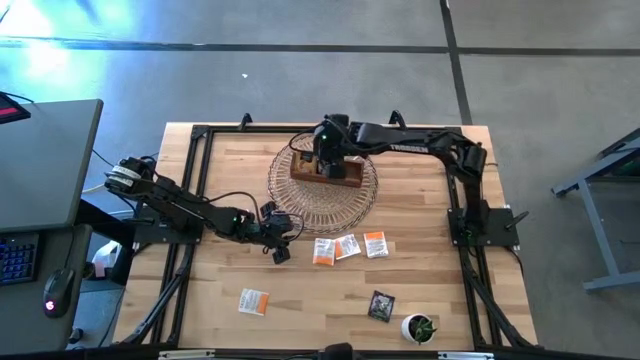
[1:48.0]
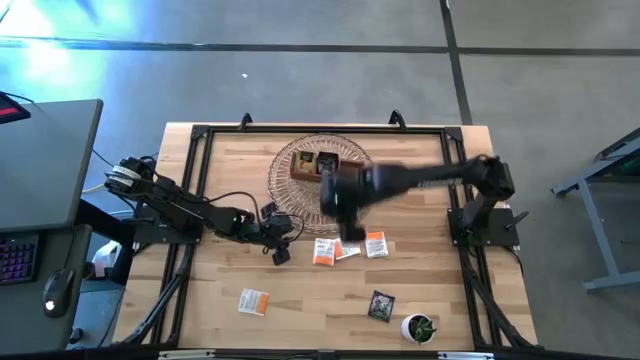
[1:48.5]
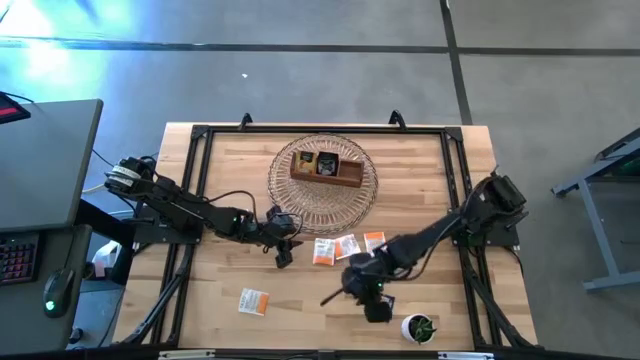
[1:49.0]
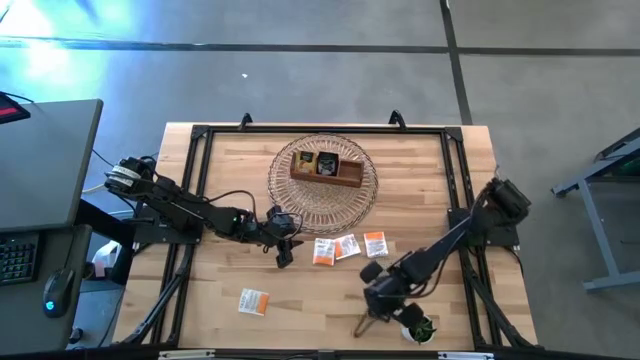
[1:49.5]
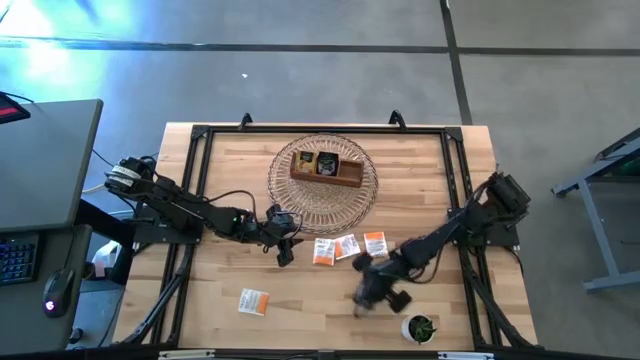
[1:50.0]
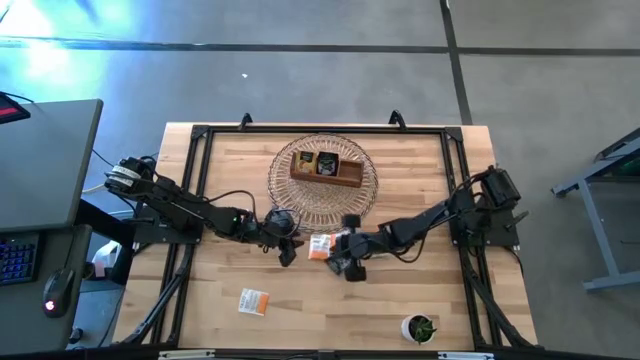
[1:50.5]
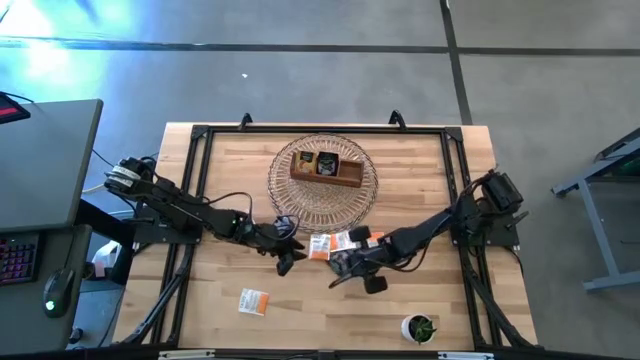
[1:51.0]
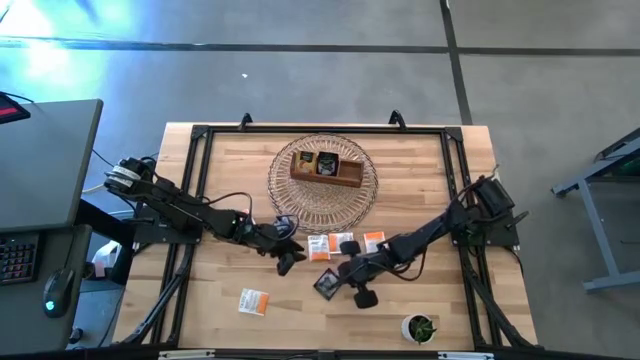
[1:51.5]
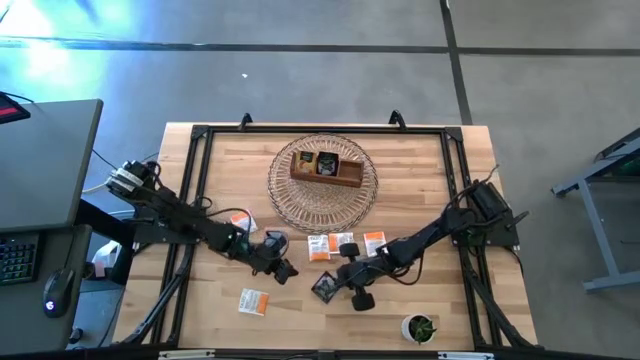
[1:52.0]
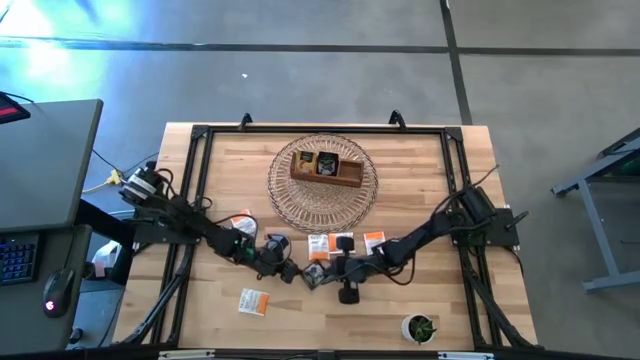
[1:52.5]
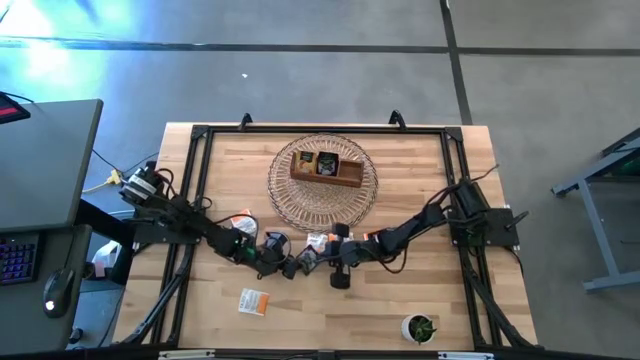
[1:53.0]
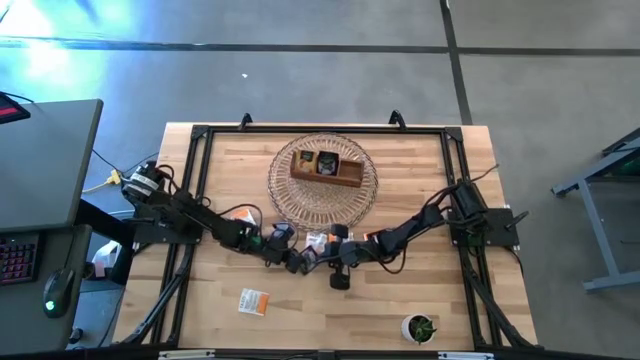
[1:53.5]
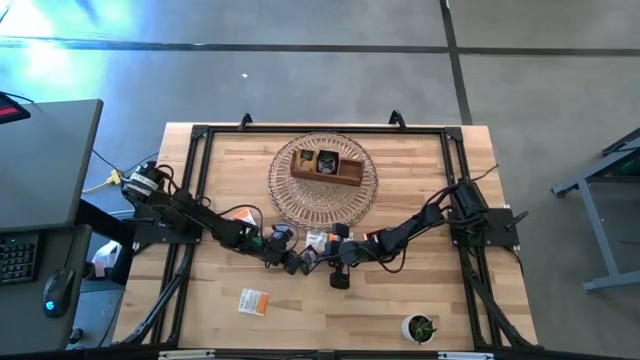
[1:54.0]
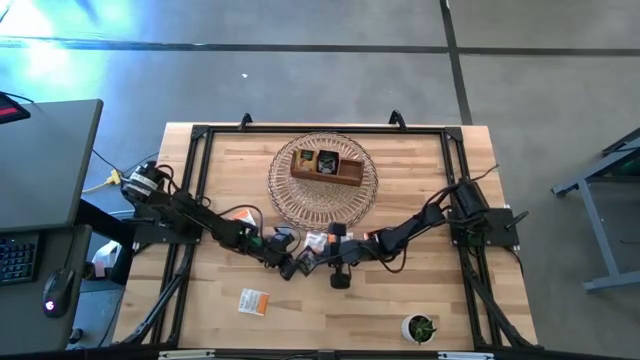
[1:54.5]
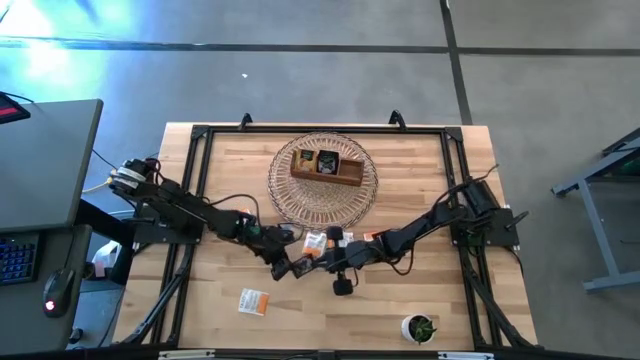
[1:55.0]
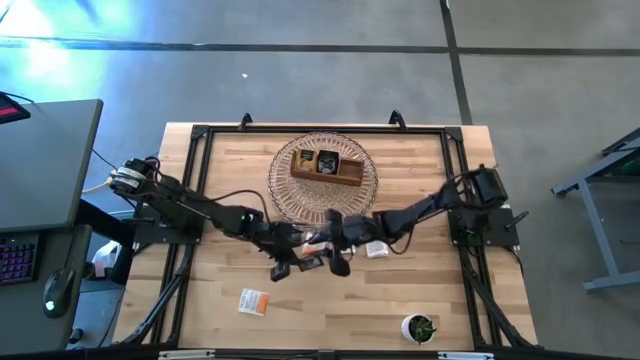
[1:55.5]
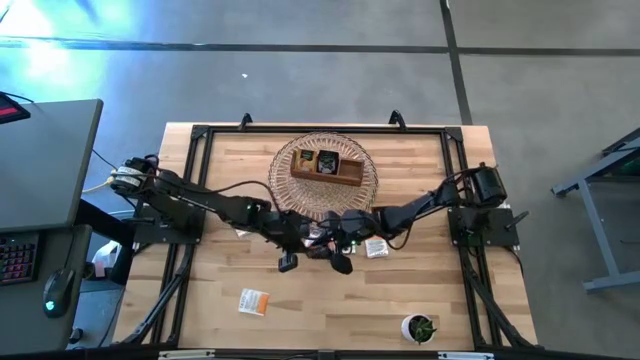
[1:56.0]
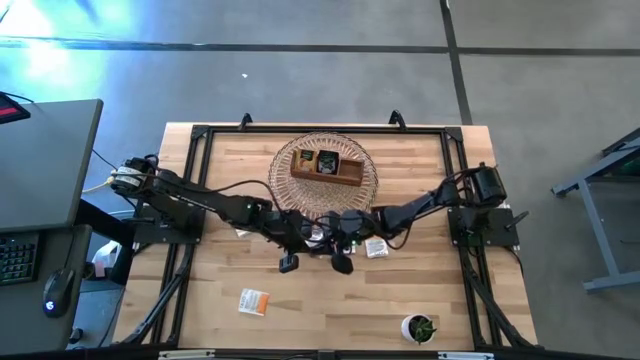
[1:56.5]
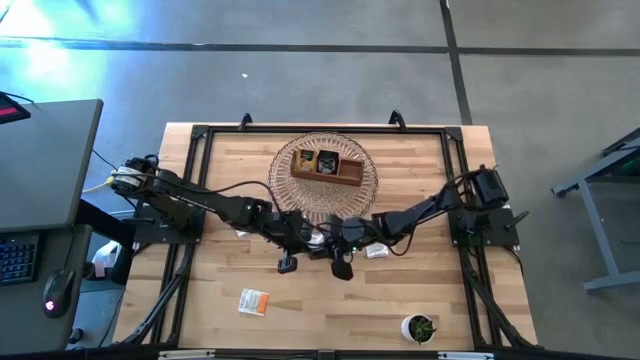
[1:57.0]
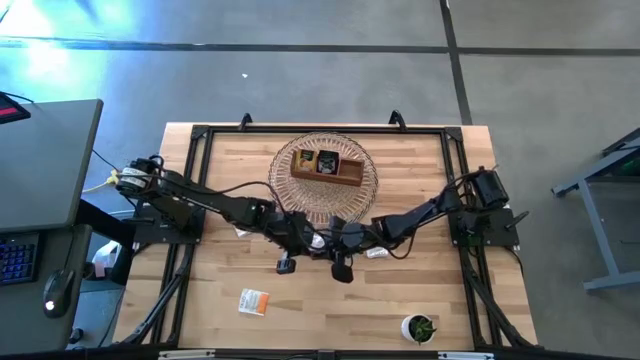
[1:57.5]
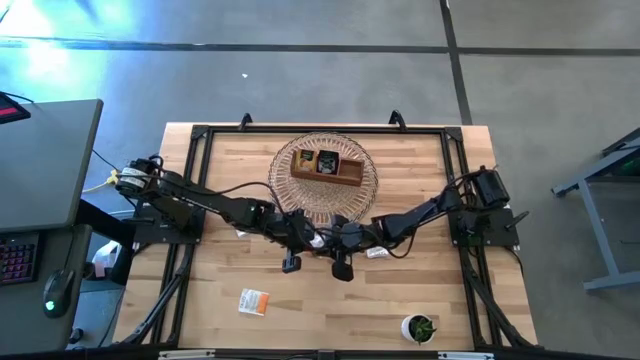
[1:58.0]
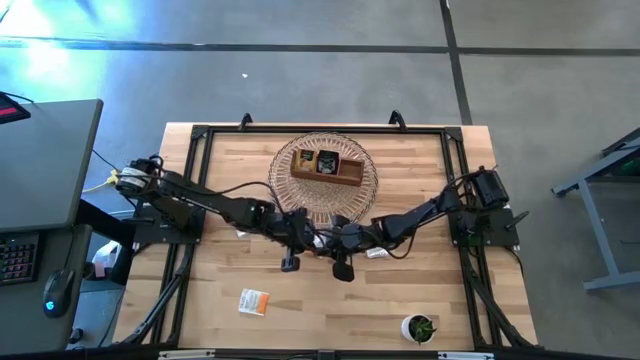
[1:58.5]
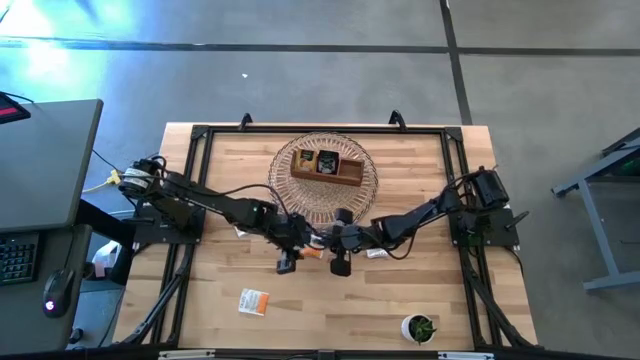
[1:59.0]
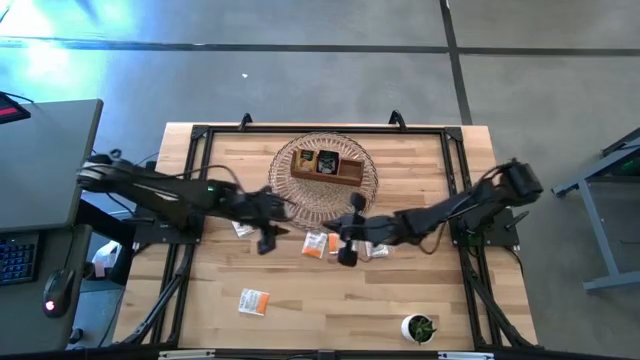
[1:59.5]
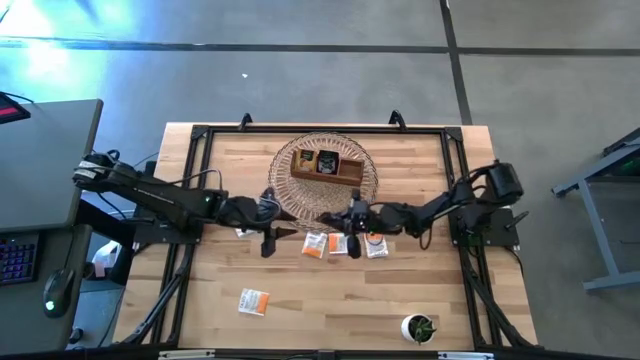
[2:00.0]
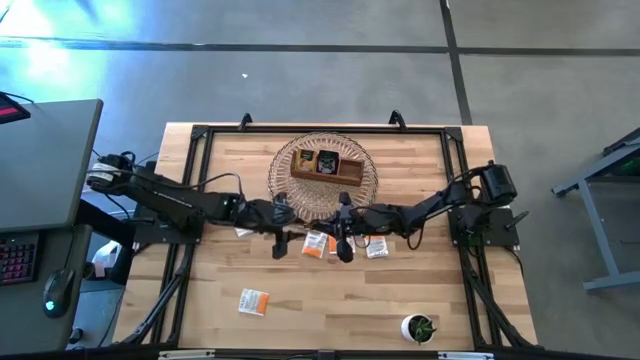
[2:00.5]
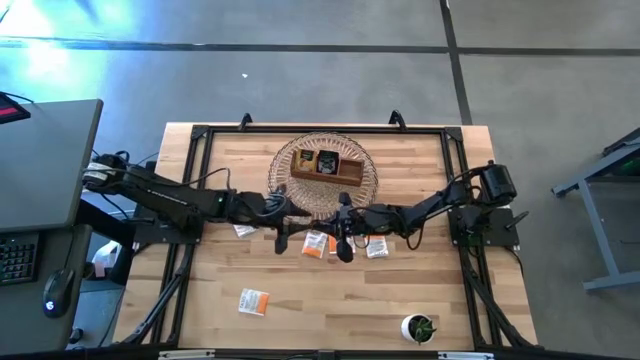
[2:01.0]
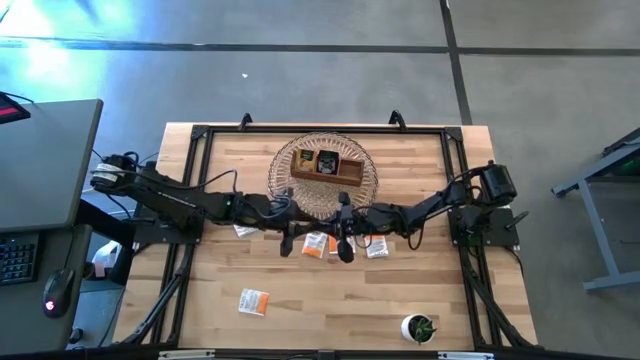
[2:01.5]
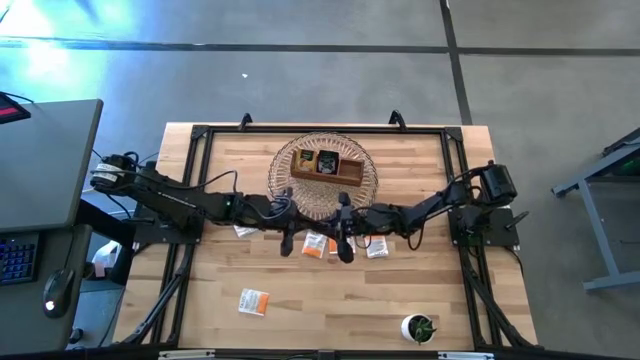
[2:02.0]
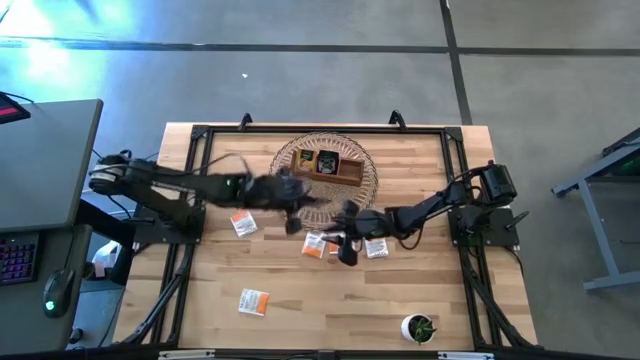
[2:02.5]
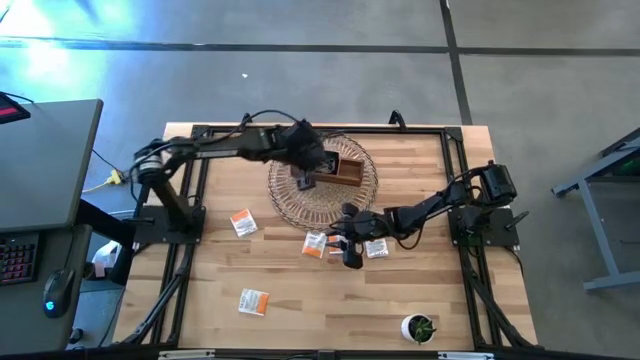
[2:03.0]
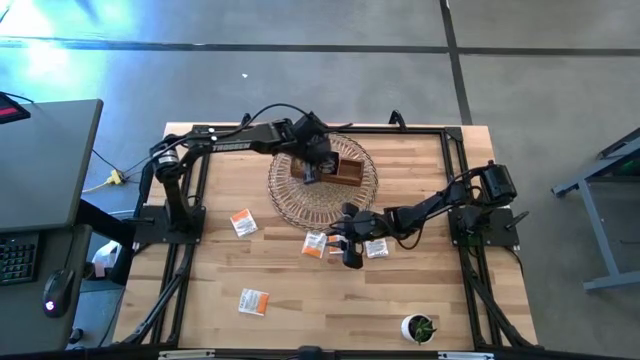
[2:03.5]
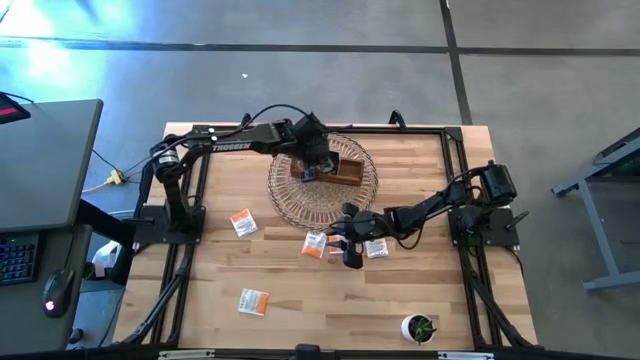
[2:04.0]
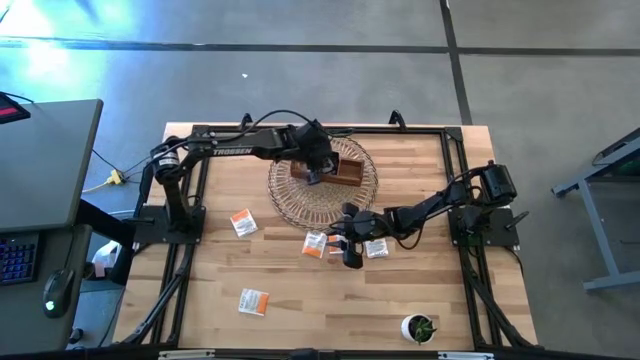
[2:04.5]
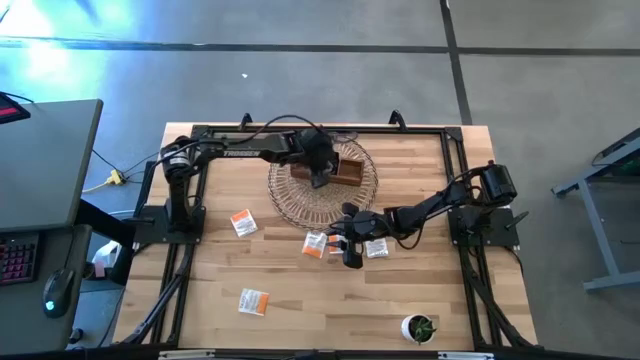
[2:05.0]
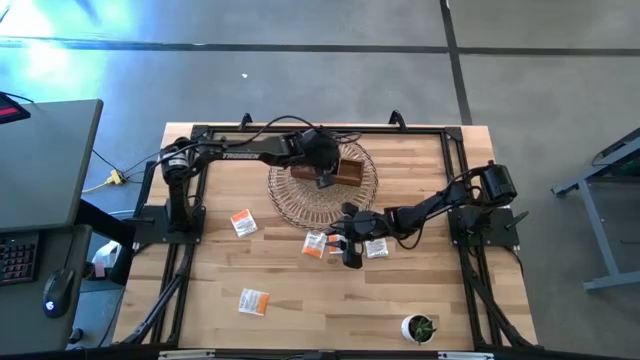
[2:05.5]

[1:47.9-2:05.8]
Task: Pick & Place Tea
Put the black tea bag into the middle section of the wooden organizer

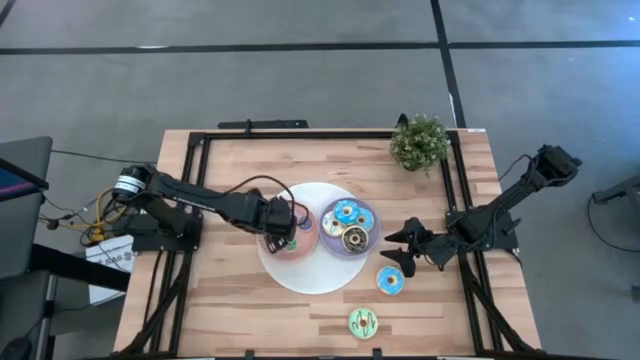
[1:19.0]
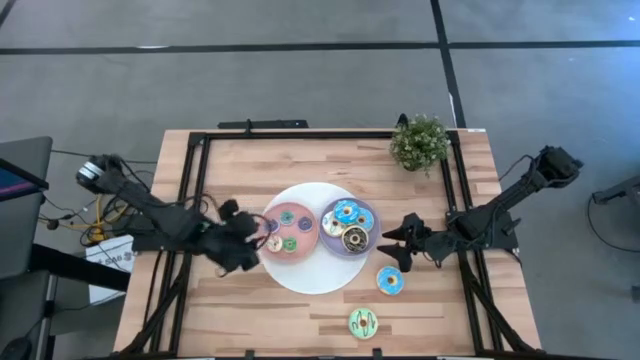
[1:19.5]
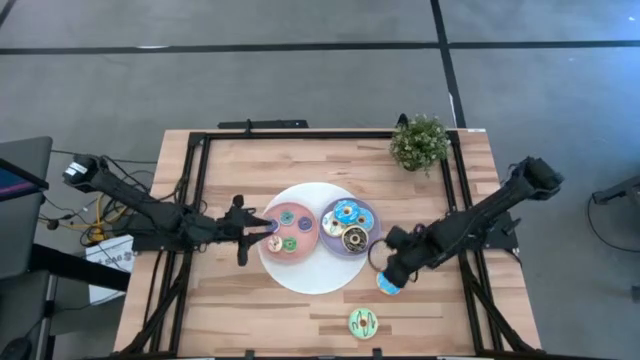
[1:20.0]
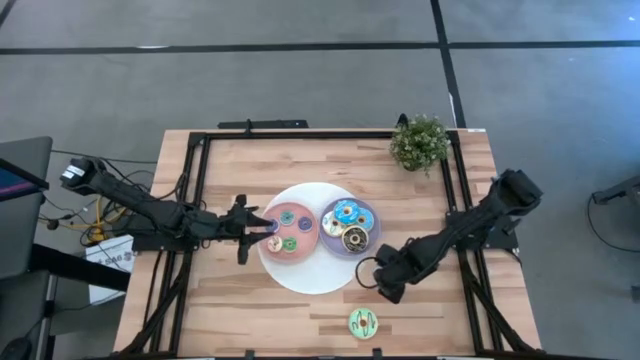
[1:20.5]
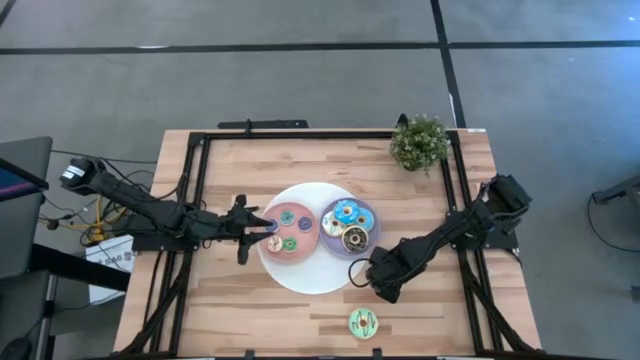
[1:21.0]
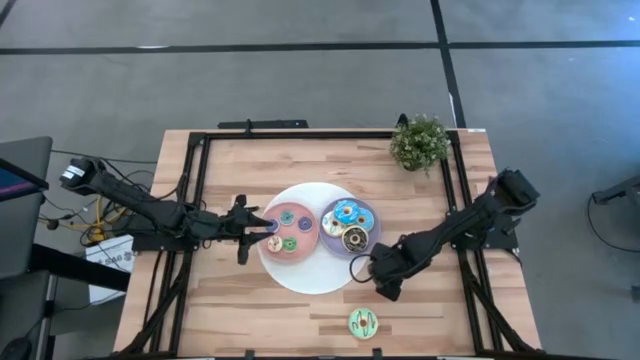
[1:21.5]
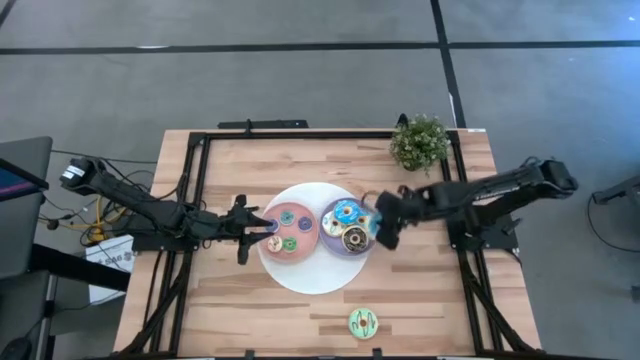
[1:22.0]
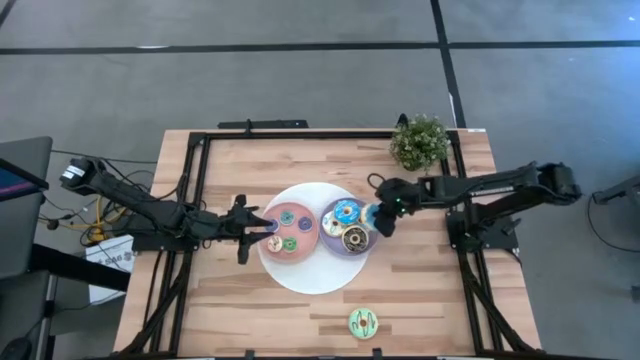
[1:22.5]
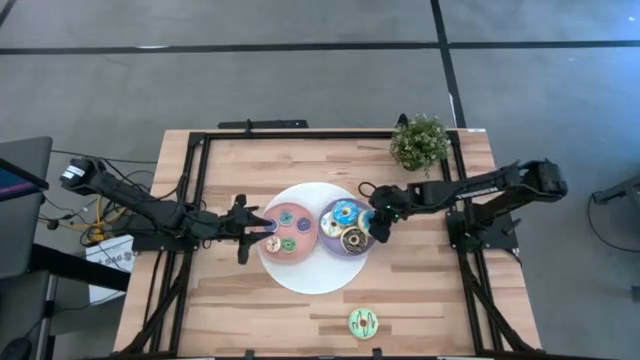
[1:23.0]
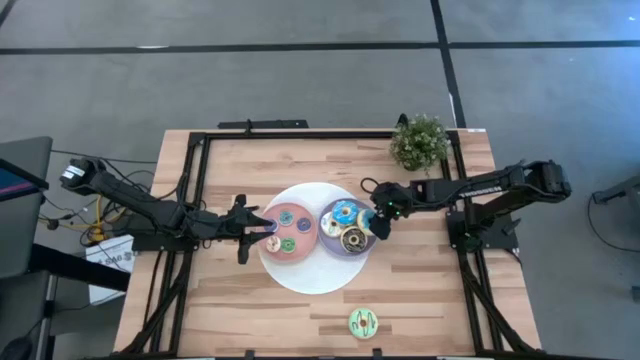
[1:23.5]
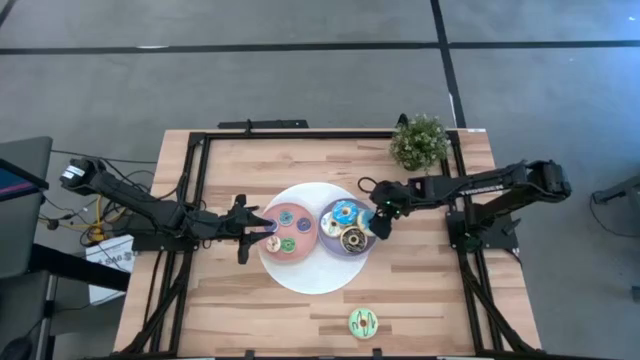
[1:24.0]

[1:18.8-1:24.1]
Task: Pick & Place donuts
Put the big blue donut on the violet plate
